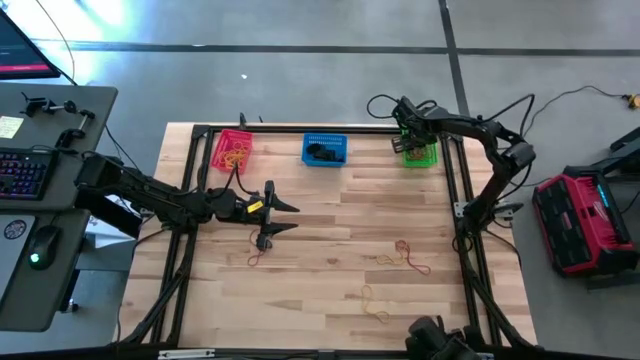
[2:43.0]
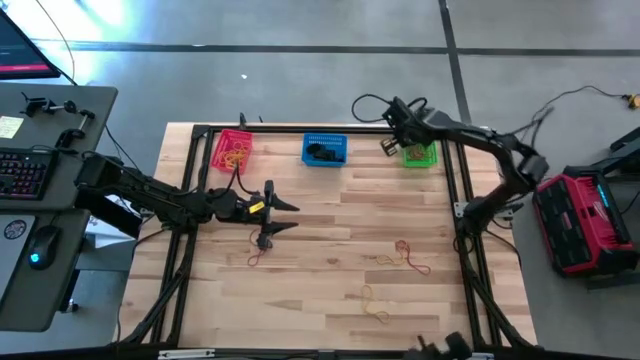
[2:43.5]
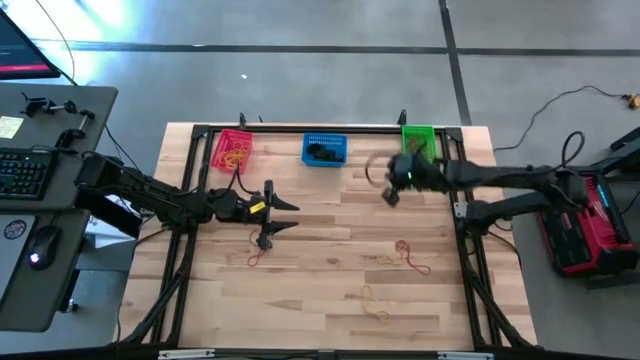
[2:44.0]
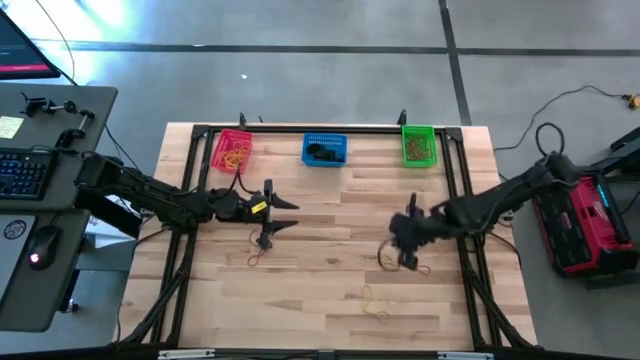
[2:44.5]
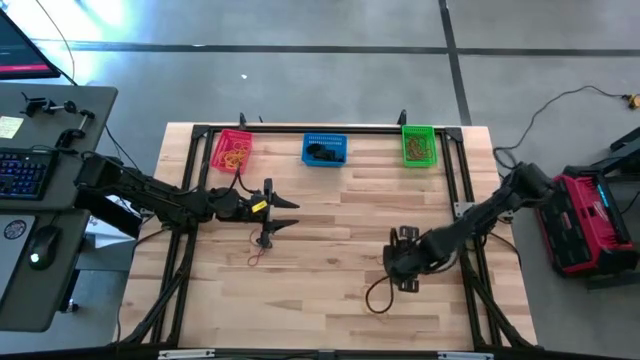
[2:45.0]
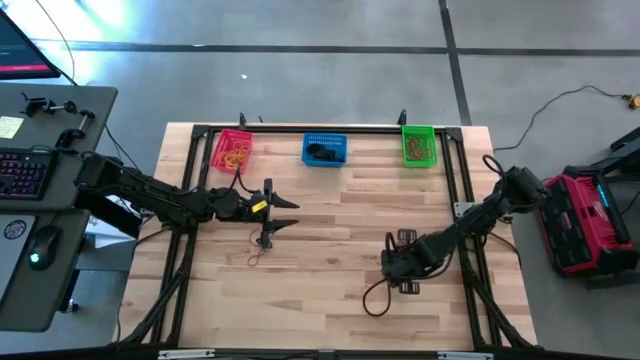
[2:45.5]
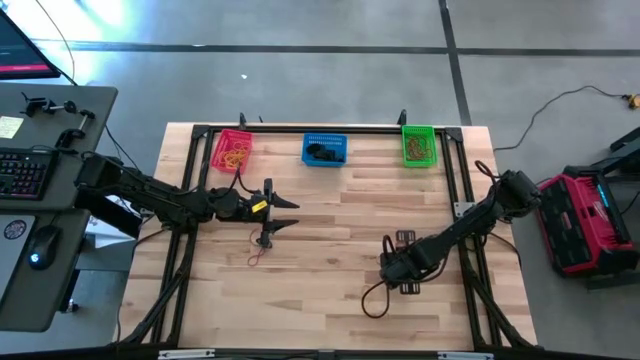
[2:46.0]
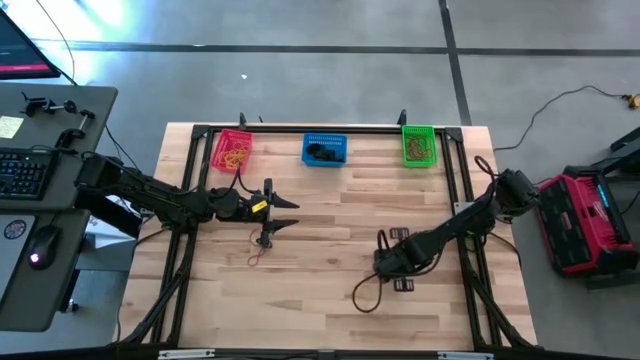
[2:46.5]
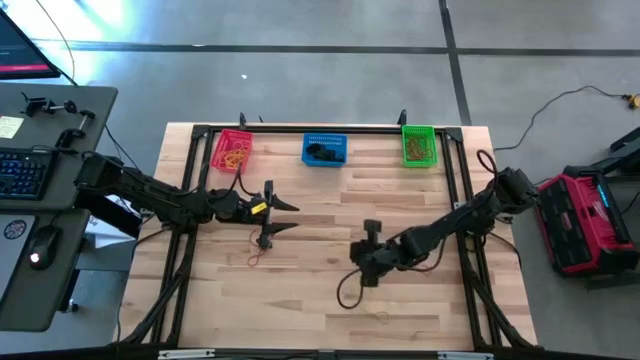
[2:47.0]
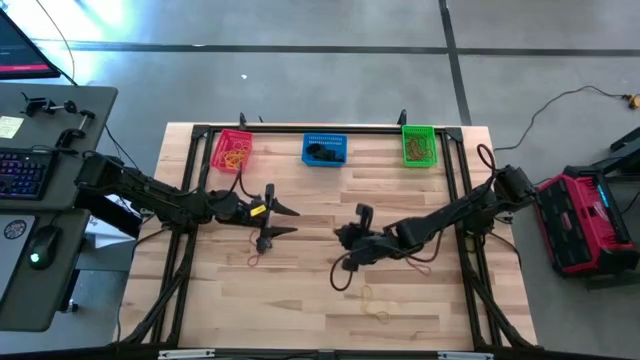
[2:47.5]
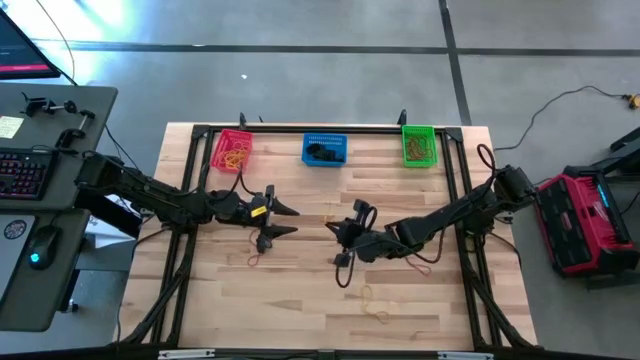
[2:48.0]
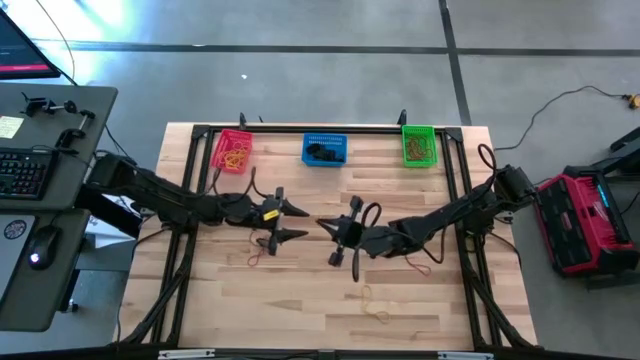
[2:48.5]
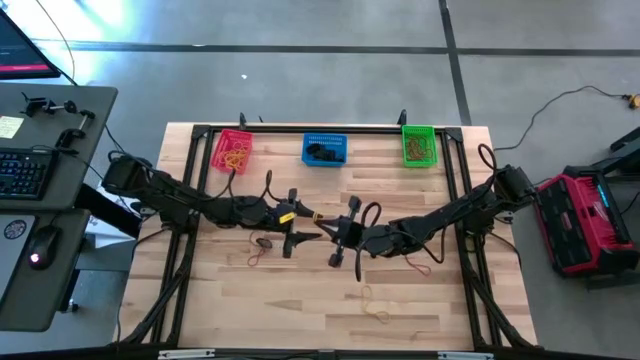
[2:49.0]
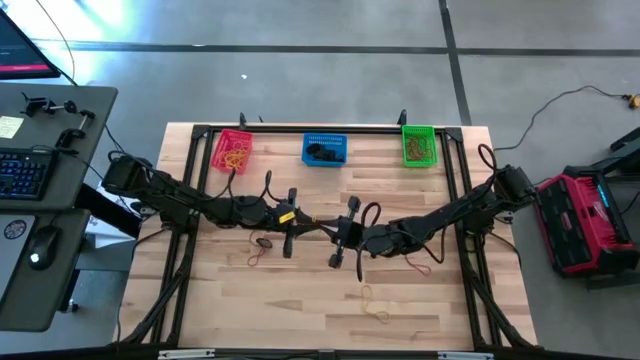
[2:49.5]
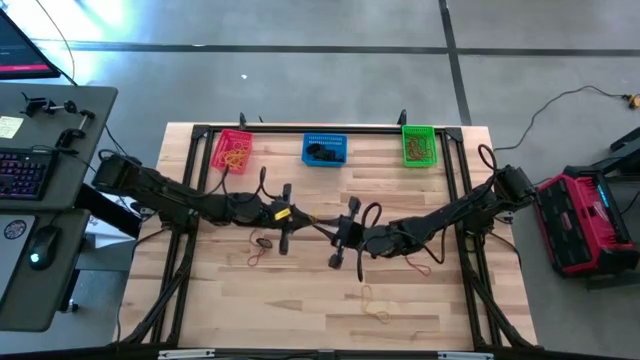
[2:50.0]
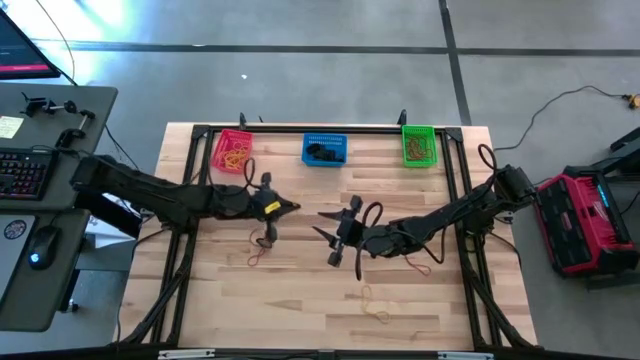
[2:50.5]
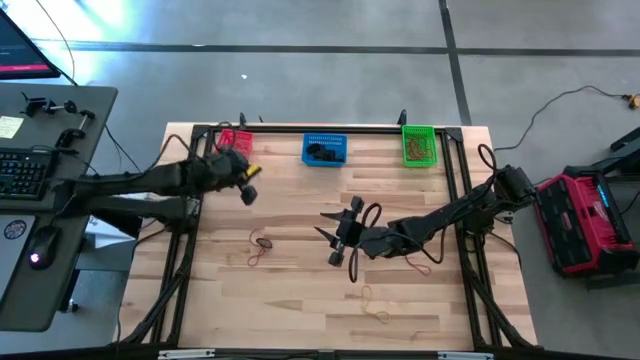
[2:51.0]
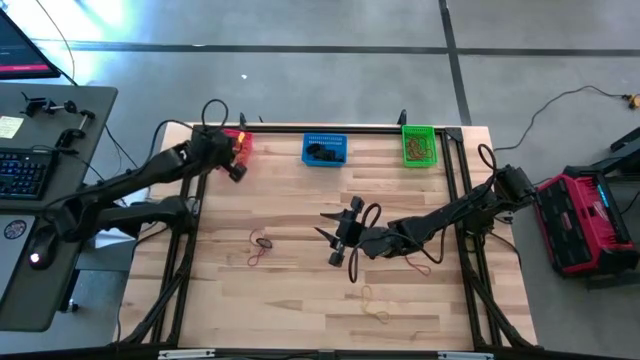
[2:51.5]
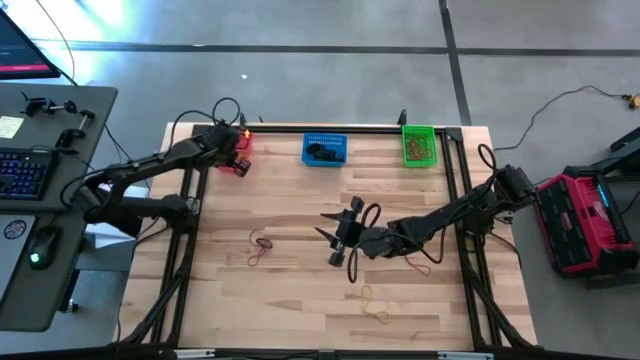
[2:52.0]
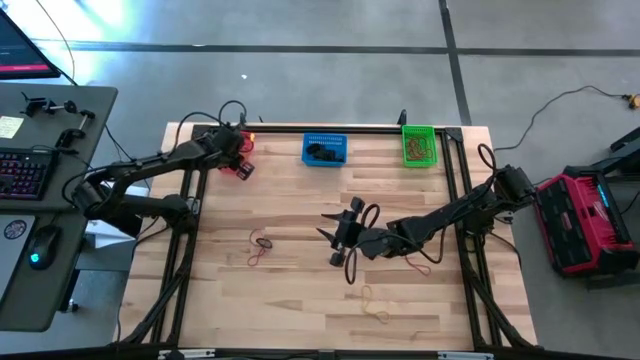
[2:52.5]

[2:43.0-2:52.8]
Task: Sort rubber bands into baskets
Put the top yellow rubber band into the red bin

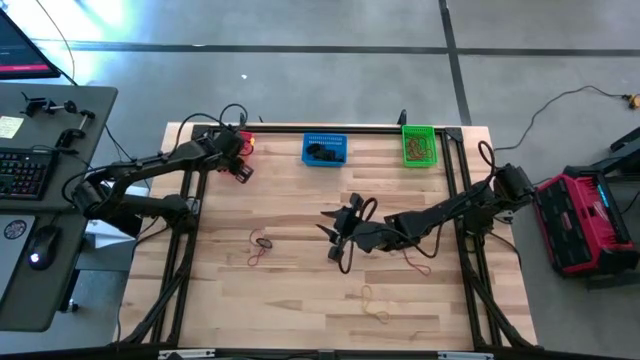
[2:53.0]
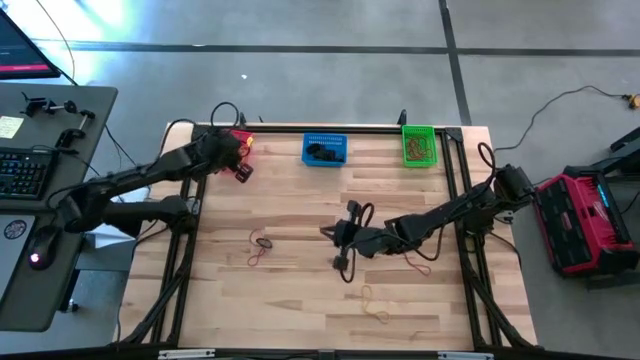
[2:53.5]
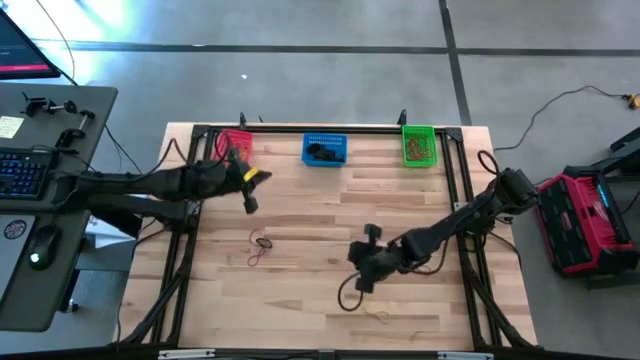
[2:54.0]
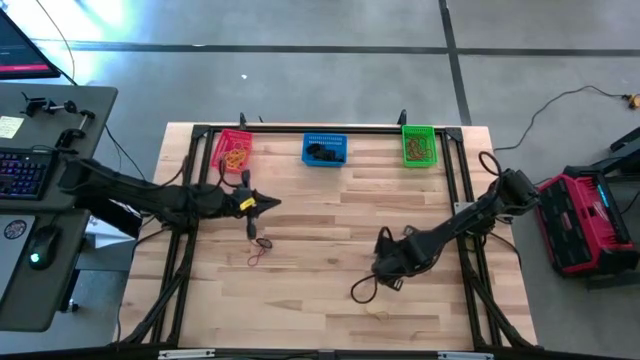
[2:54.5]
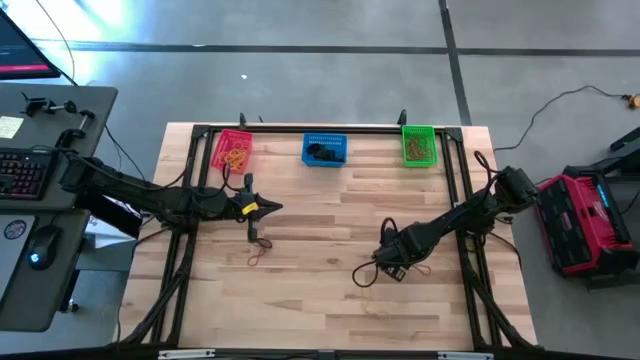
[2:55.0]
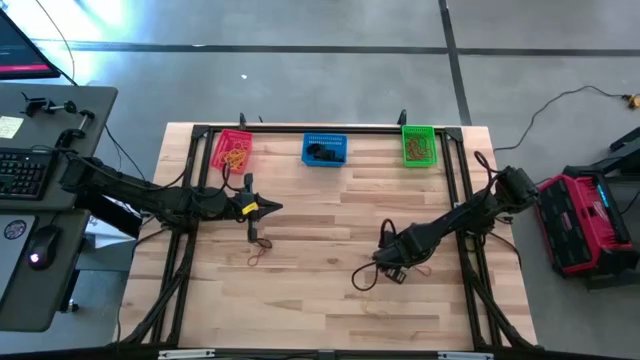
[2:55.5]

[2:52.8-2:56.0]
Put the right red rubber band into the green bin

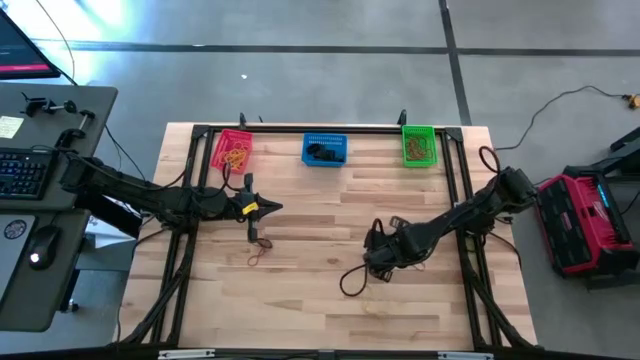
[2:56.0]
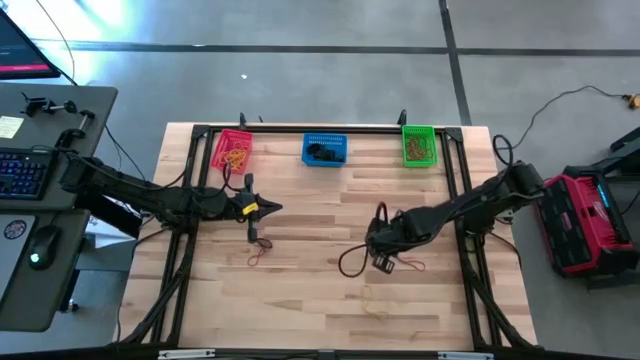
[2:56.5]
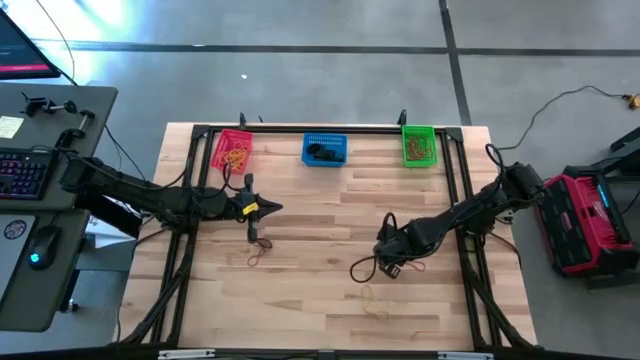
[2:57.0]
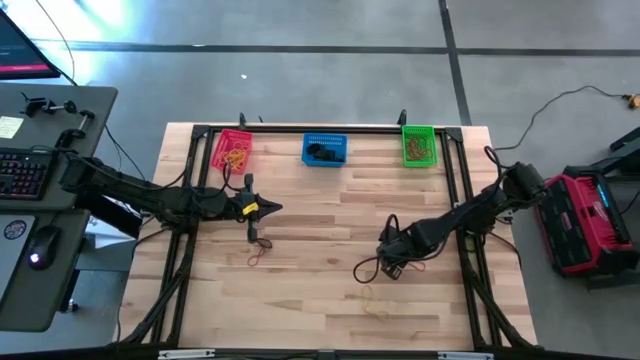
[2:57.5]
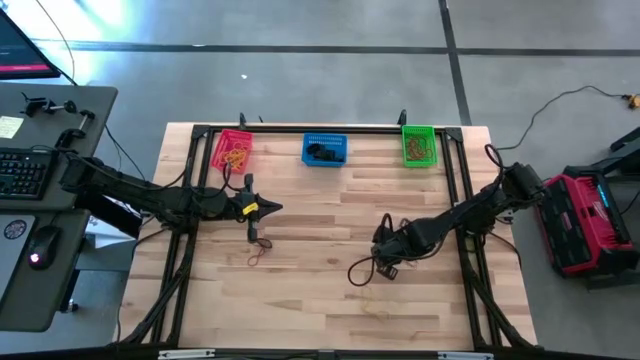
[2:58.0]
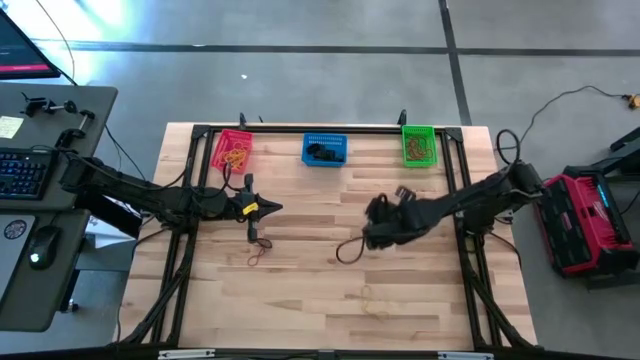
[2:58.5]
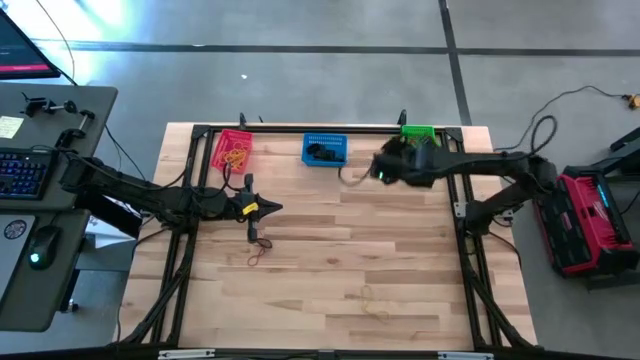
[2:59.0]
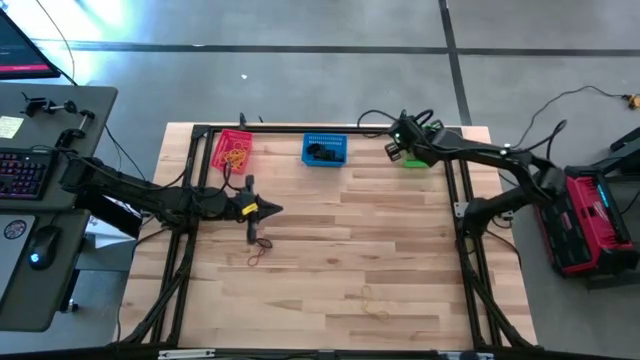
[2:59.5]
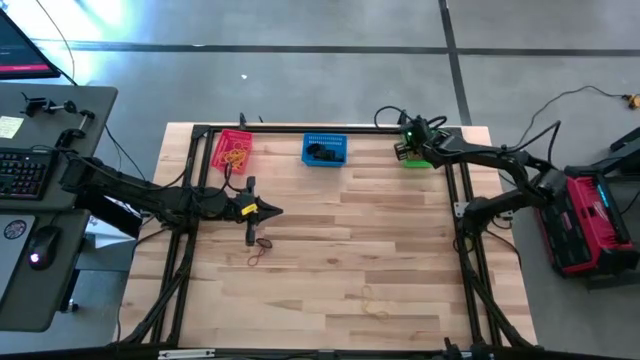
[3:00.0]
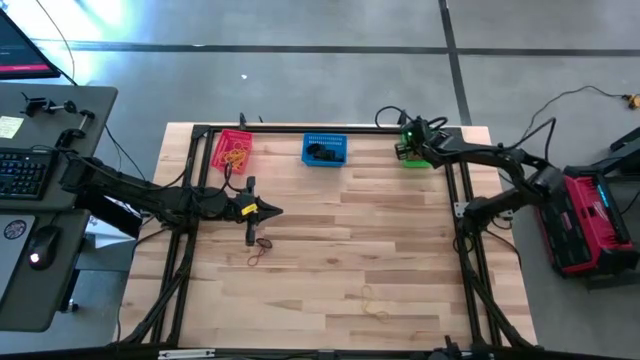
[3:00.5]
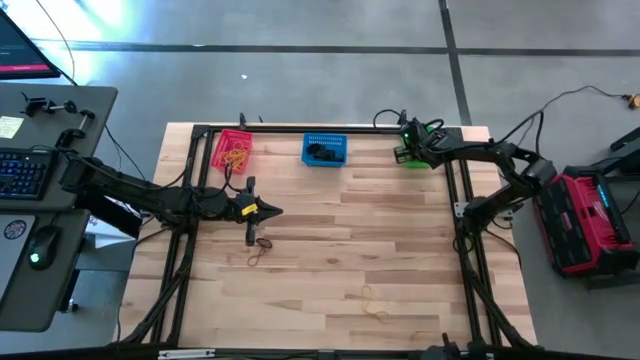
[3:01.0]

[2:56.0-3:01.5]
Put the right red rubber band into the green bin

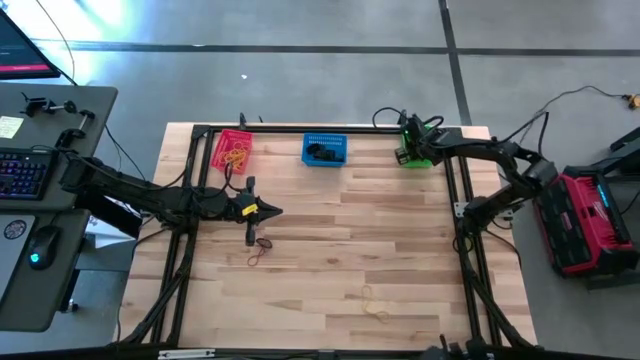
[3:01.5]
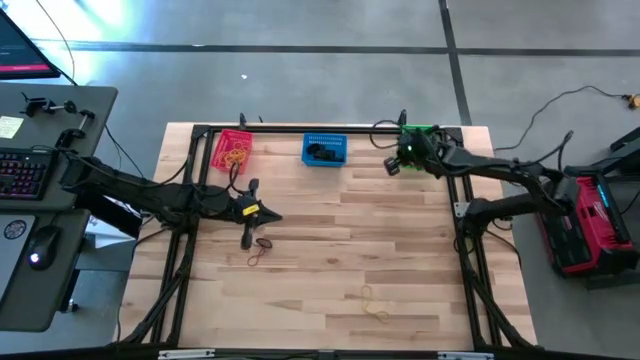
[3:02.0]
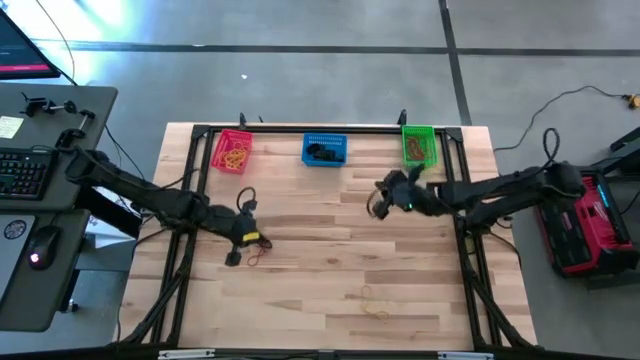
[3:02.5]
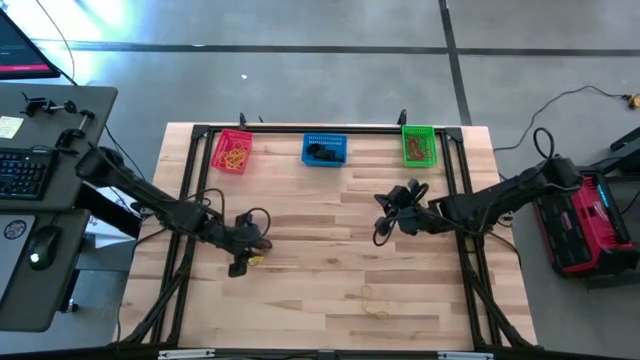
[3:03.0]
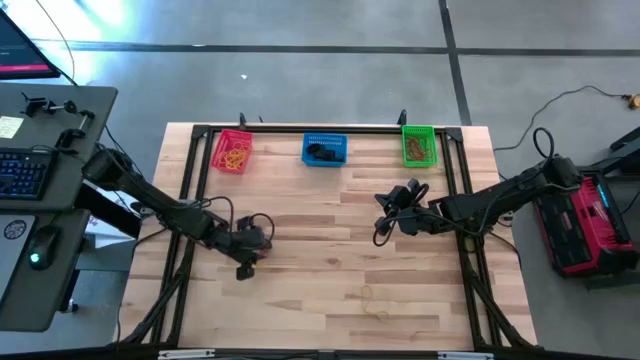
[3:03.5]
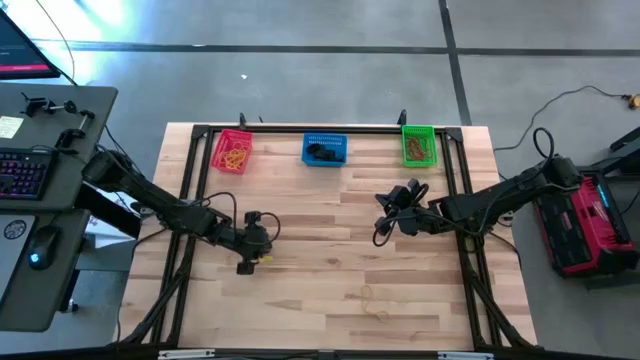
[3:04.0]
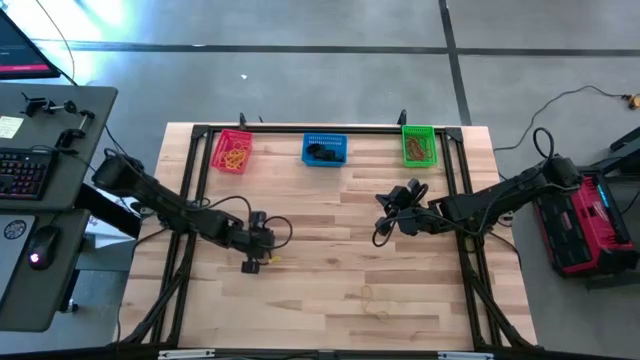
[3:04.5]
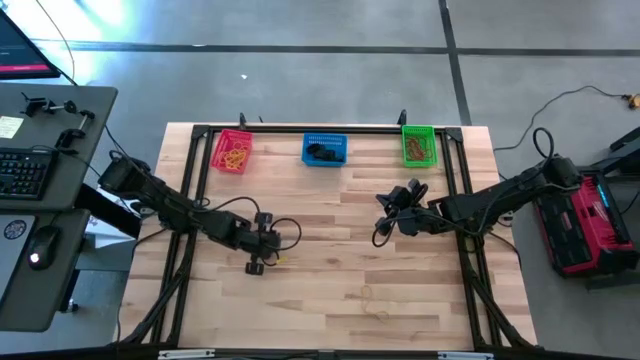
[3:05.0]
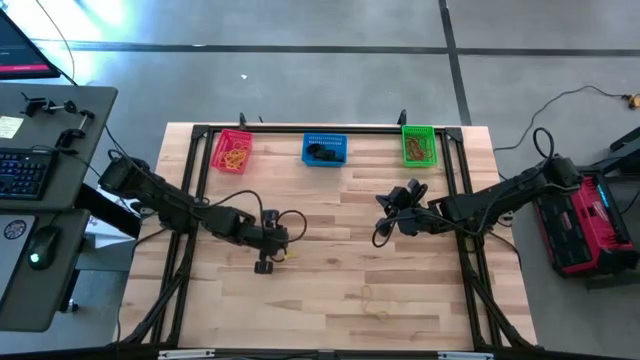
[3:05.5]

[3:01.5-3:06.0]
Put the black rubber band into the blue bin
